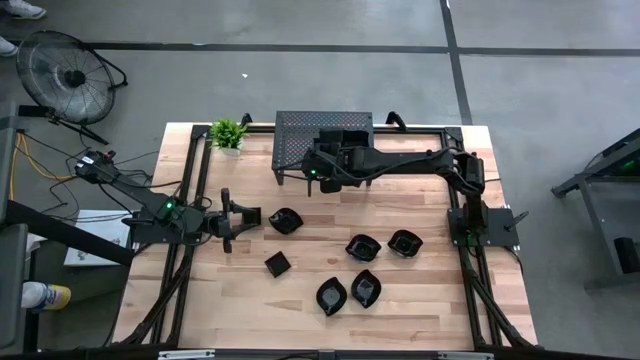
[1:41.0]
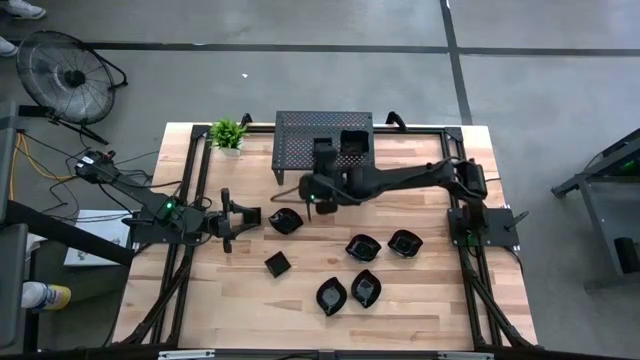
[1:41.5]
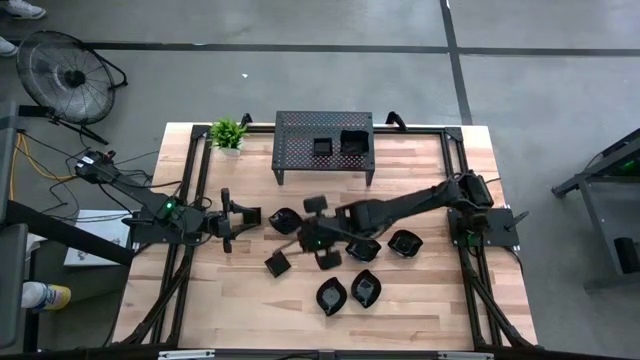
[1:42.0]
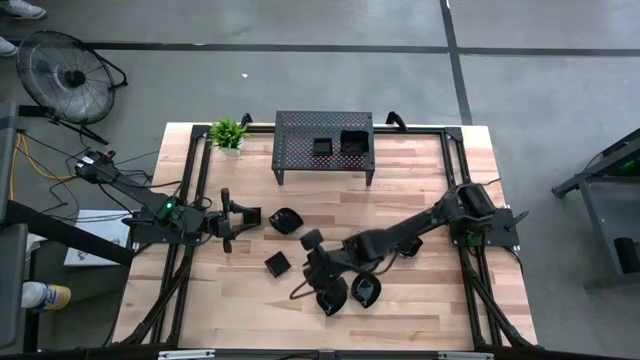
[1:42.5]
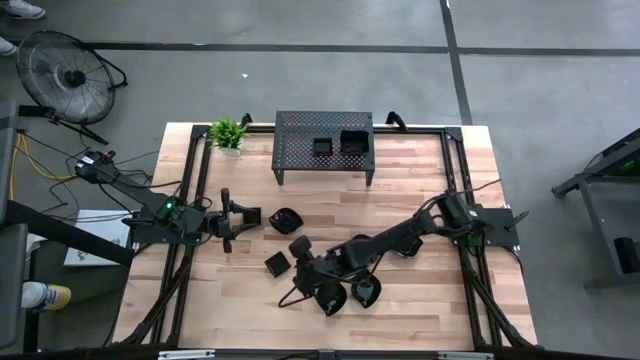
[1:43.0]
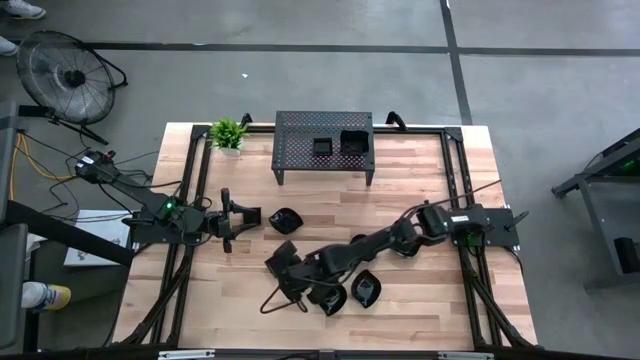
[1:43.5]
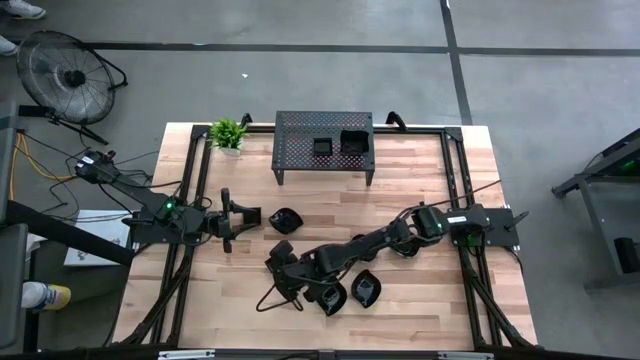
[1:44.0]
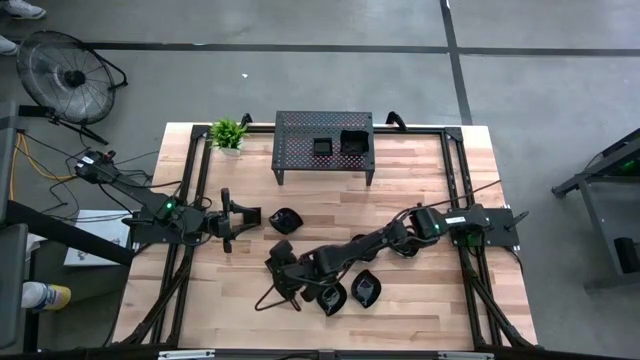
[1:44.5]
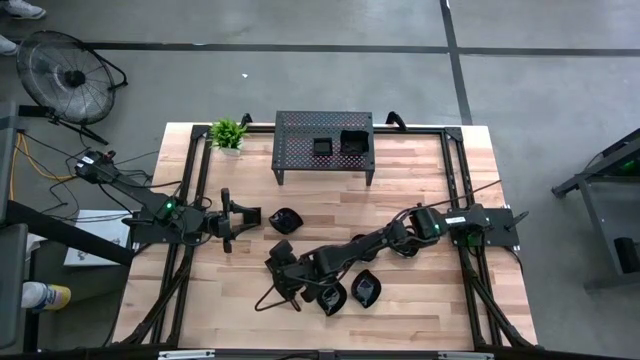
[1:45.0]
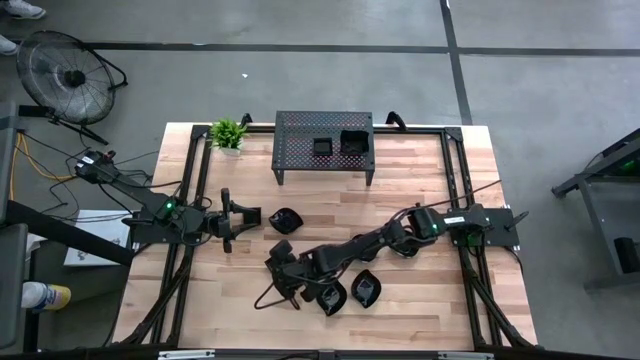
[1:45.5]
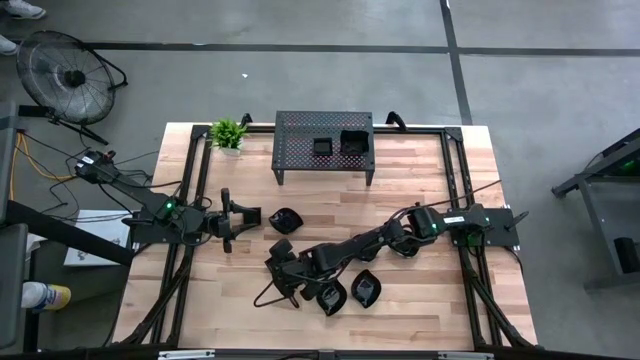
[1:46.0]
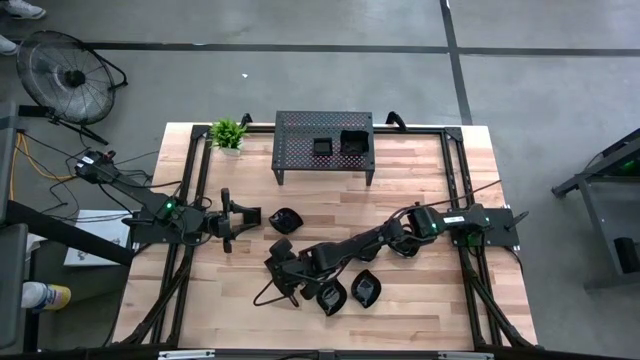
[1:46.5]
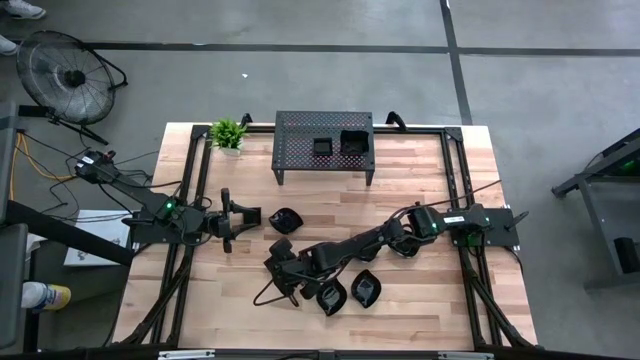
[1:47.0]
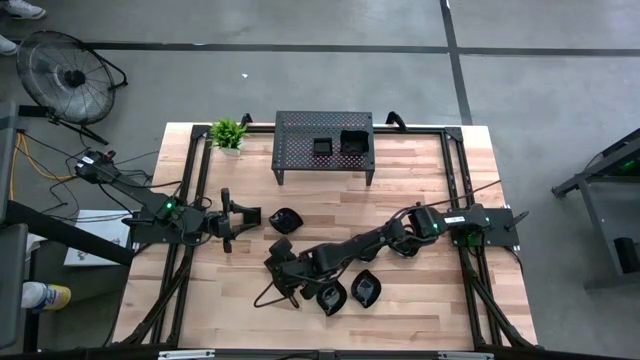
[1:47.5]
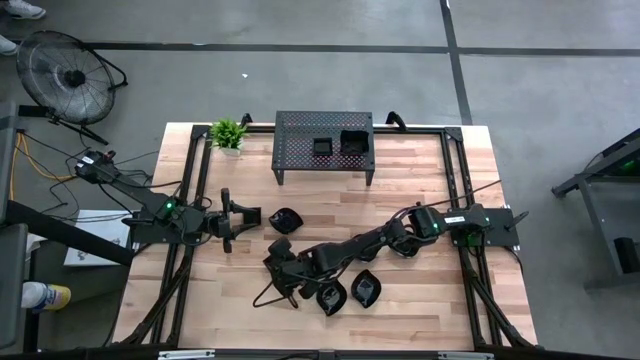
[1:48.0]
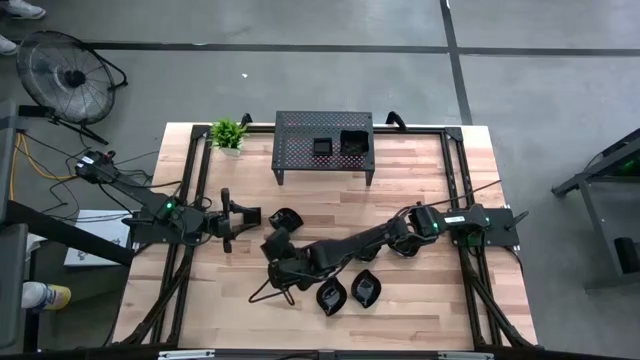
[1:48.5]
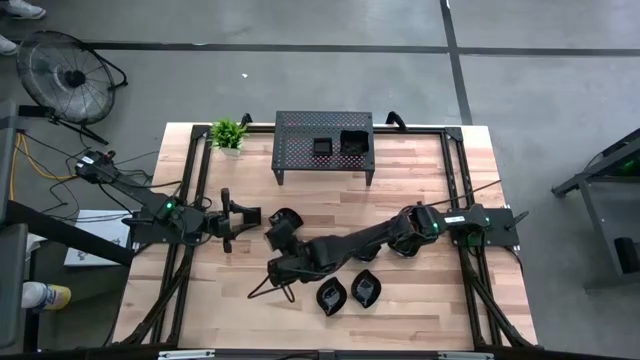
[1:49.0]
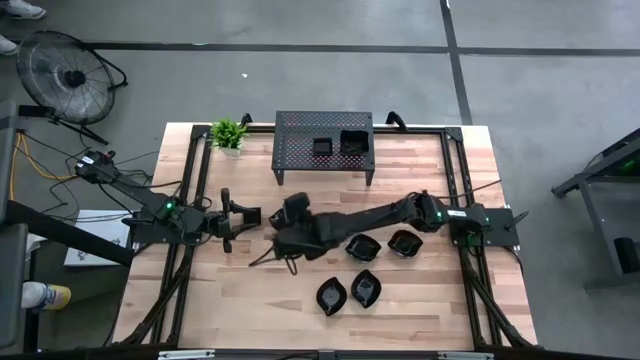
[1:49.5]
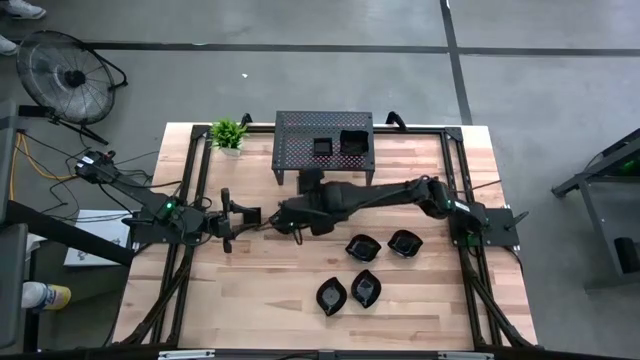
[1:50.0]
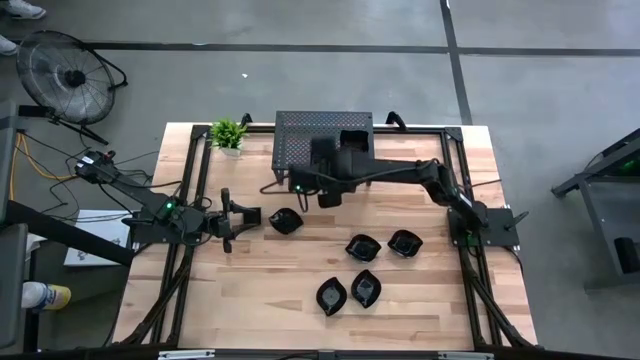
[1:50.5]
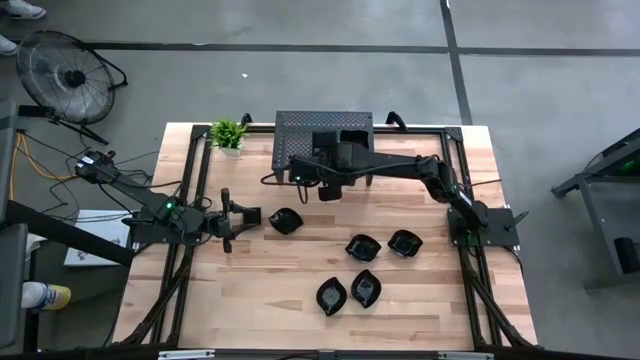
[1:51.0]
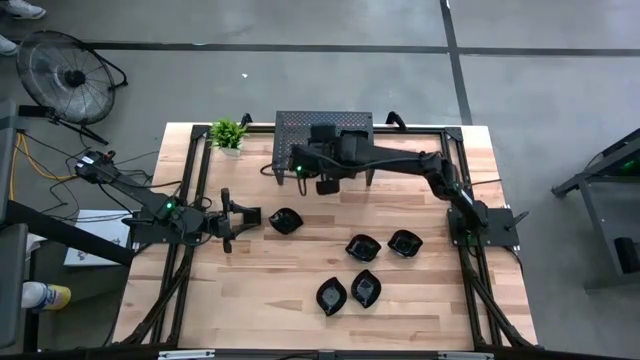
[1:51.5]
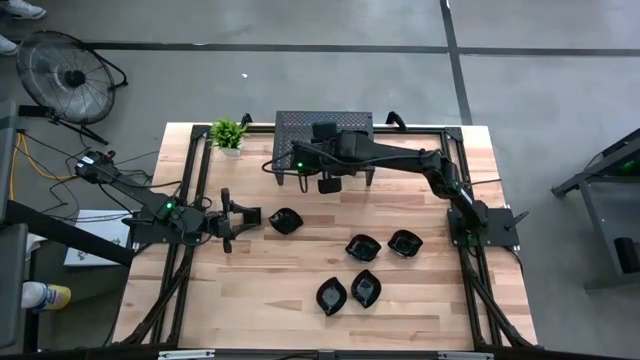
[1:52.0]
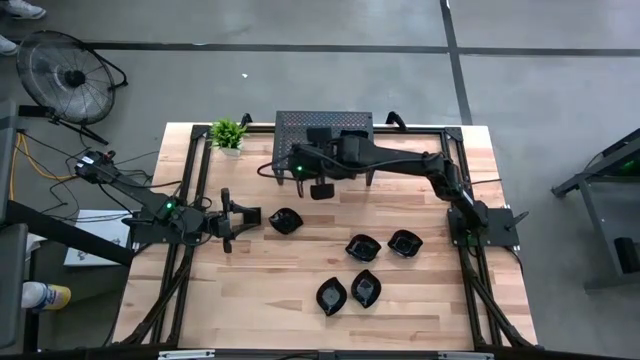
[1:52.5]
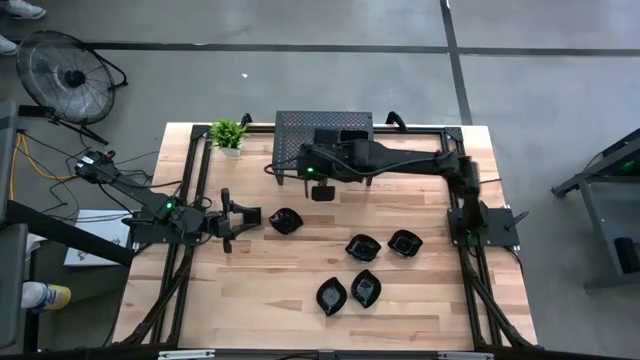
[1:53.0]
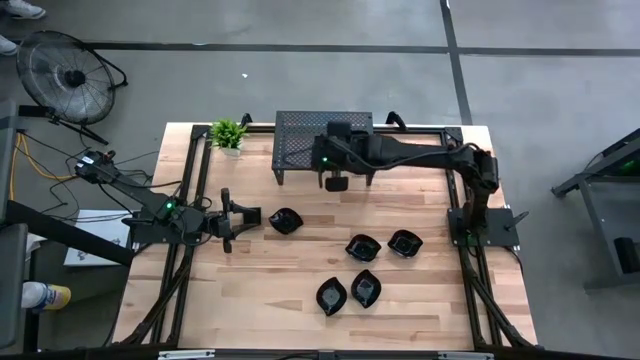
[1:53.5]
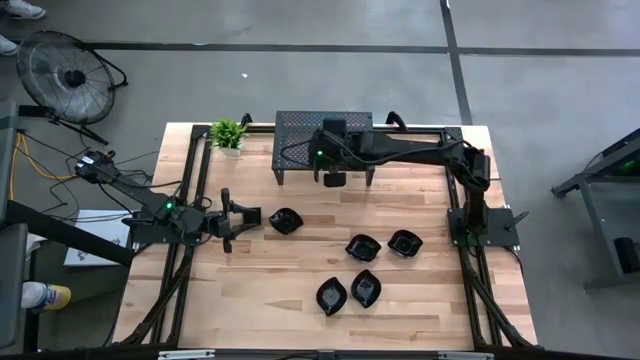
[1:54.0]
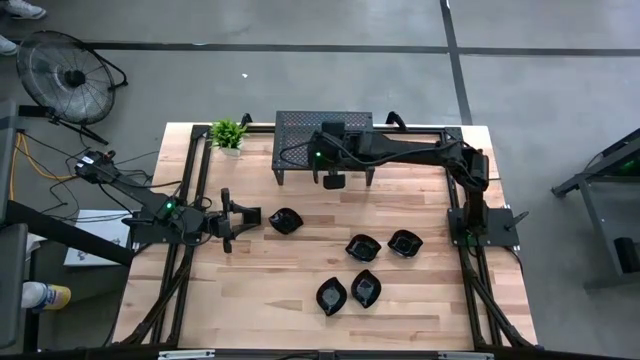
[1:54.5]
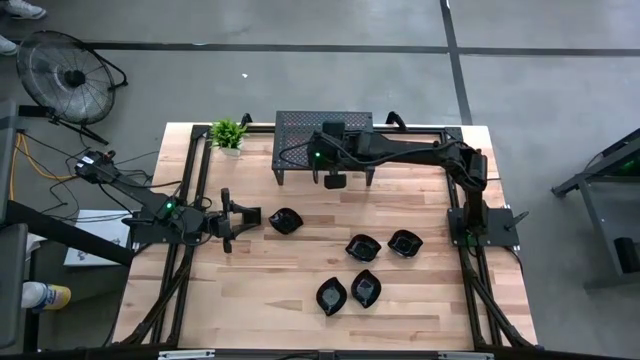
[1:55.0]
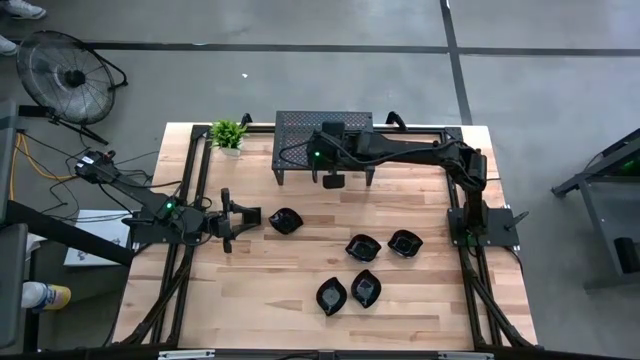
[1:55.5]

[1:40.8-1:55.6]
Task: Pick & Place Mini shaped plates
Stack the square plate on top of the square plate on the shelf

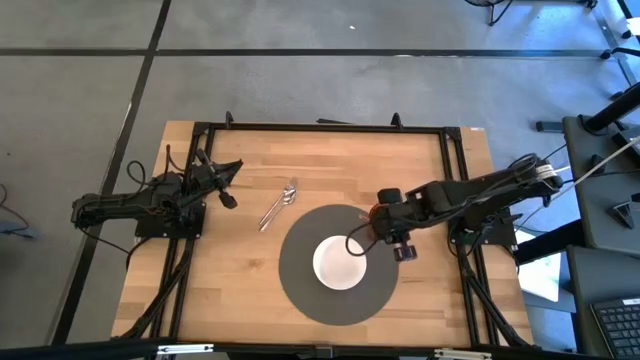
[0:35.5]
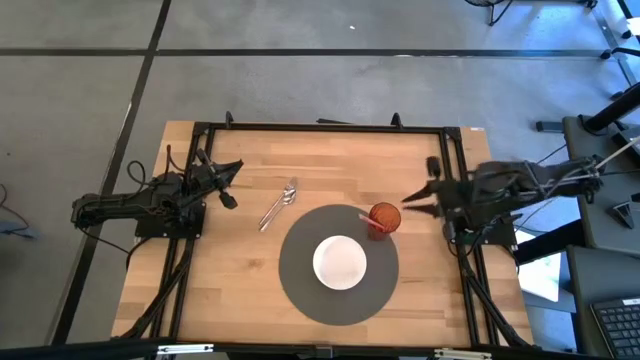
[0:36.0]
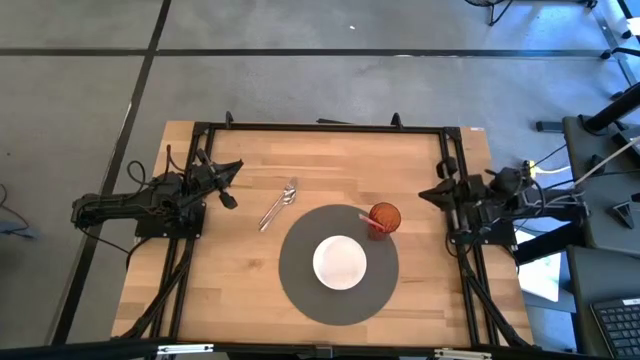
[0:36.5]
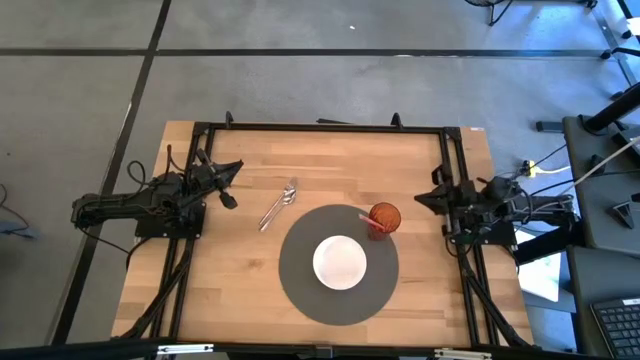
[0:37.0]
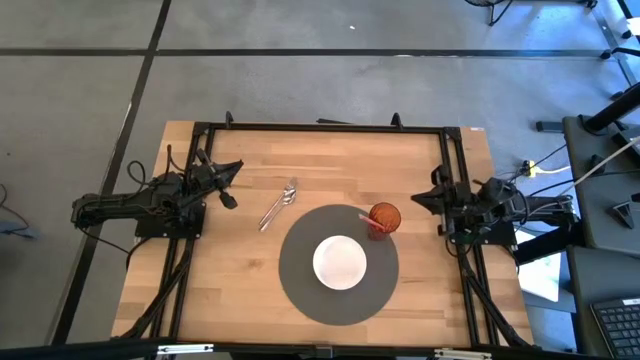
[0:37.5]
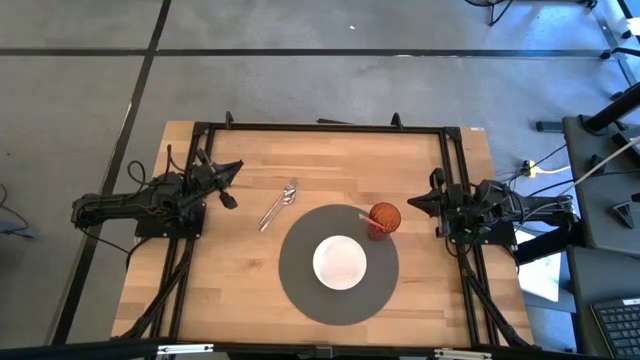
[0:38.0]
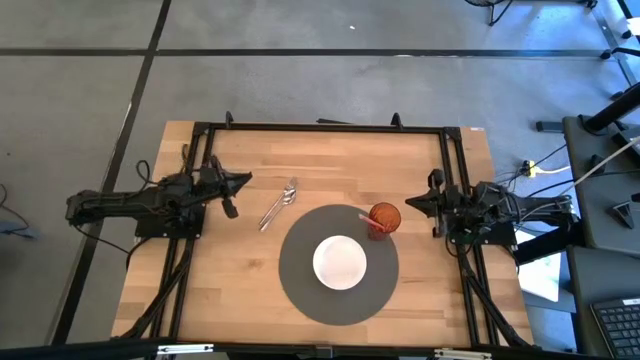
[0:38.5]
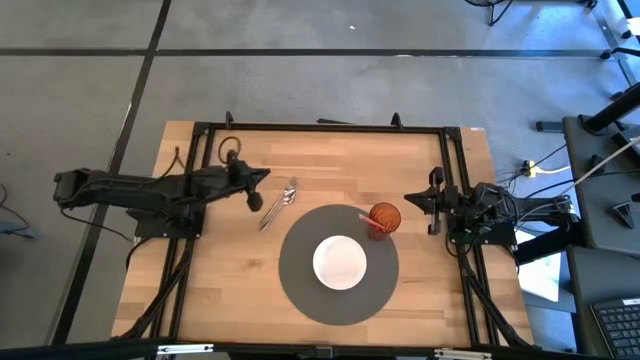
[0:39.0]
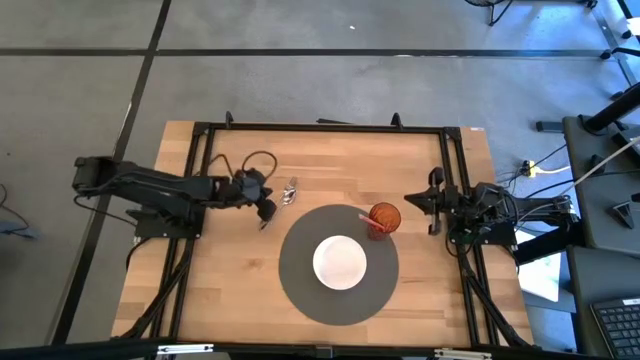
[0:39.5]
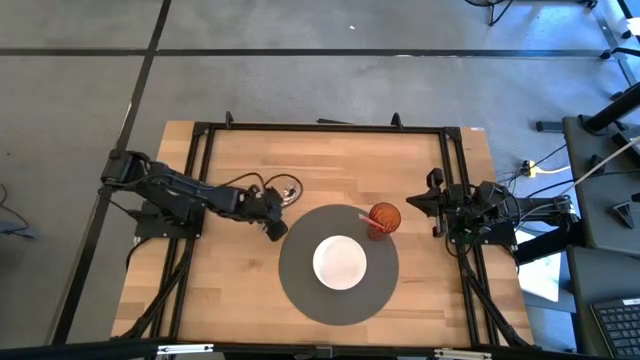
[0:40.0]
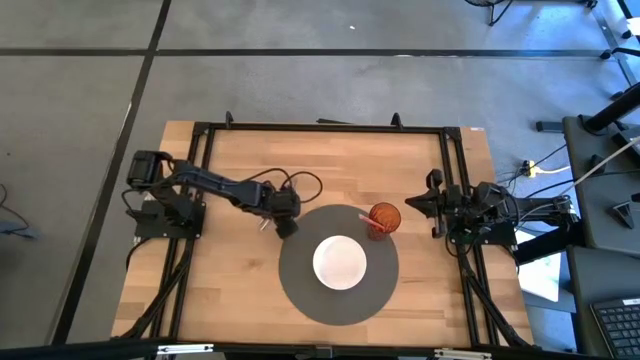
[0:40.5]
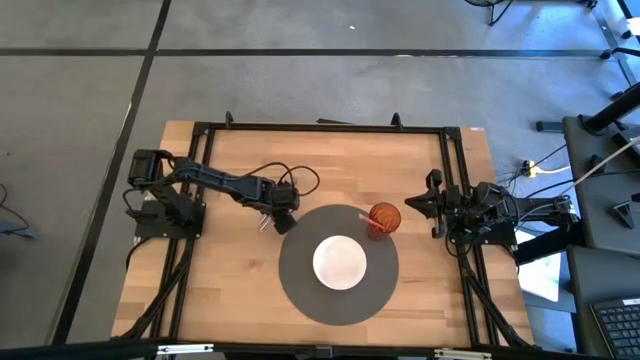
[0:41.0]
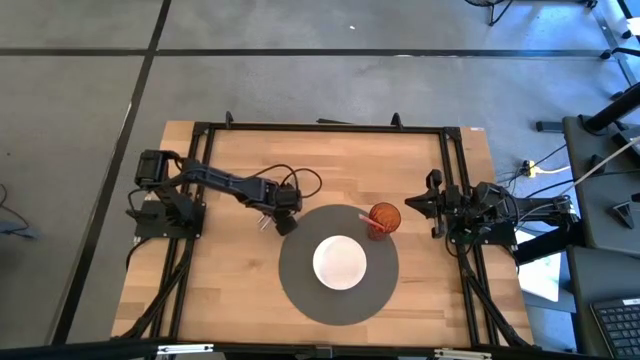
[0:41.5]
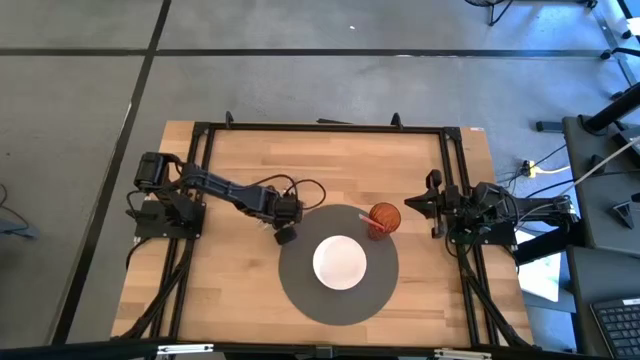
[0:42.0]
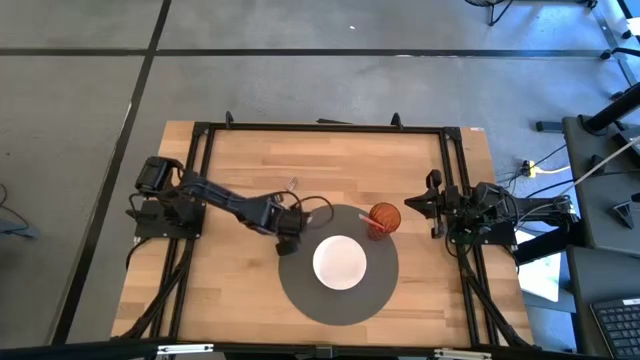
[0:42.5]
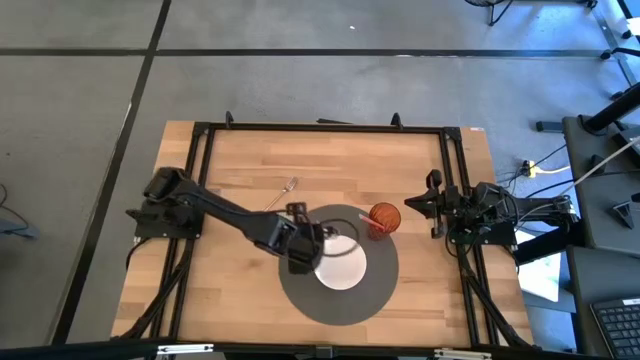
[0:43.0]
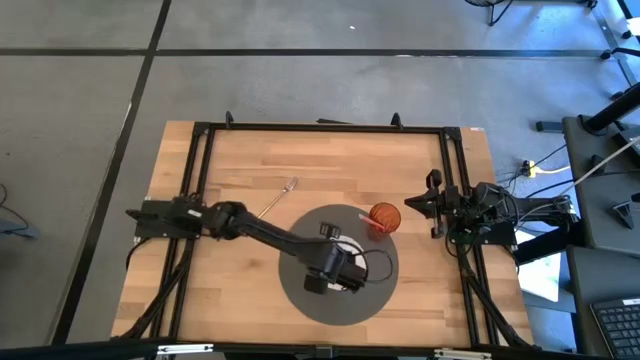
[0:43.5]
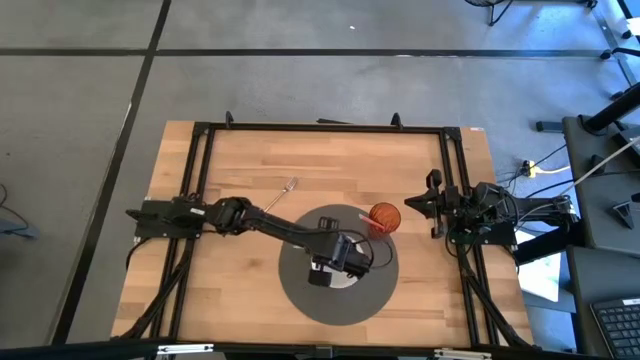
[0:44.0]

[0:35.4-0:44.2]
Task: Pick & Place Utensil
Put the silver spoon into the white bowl on the gray placemat
